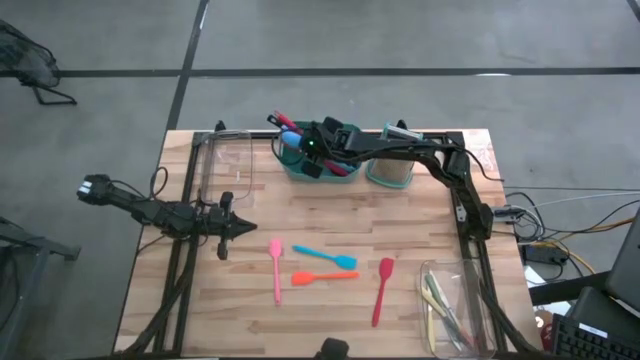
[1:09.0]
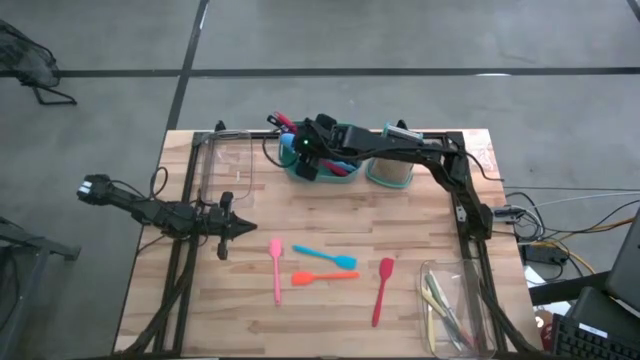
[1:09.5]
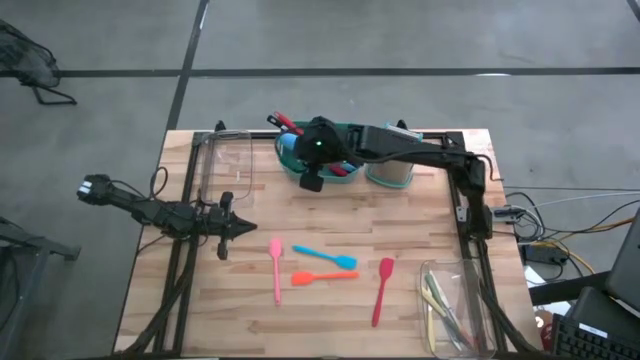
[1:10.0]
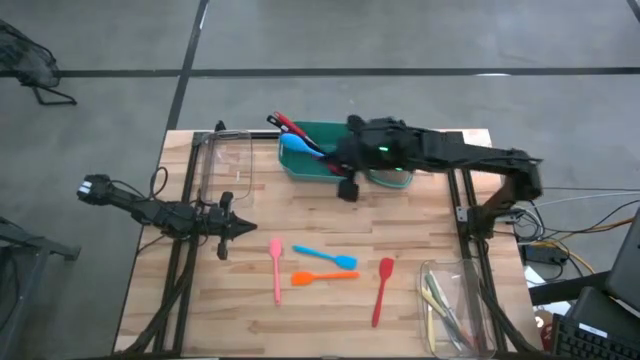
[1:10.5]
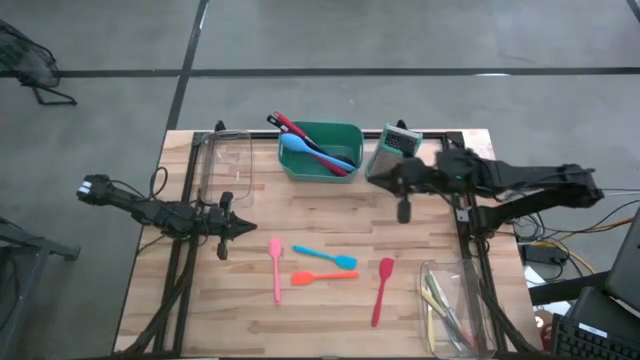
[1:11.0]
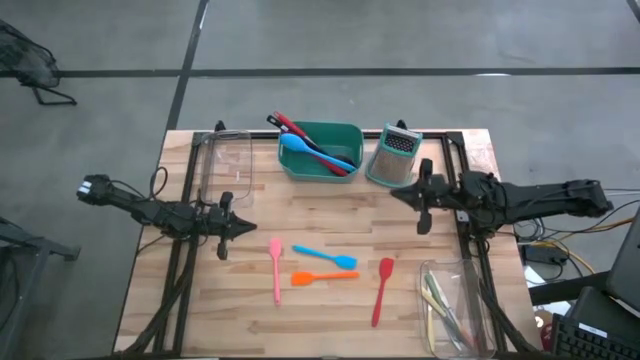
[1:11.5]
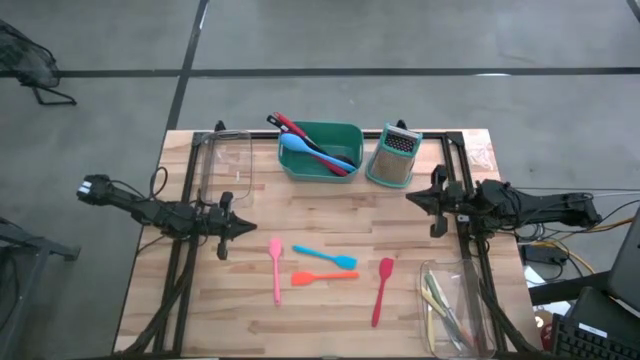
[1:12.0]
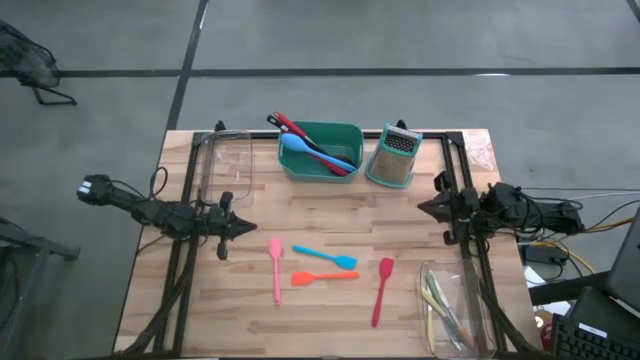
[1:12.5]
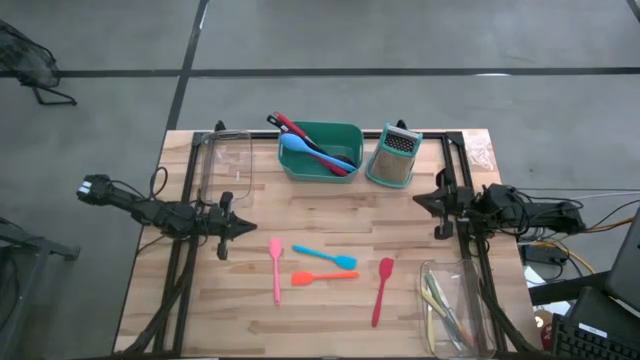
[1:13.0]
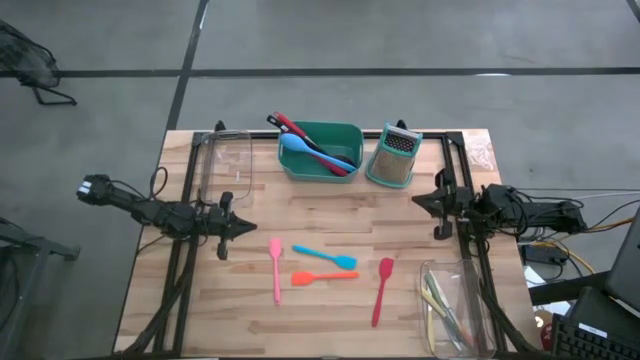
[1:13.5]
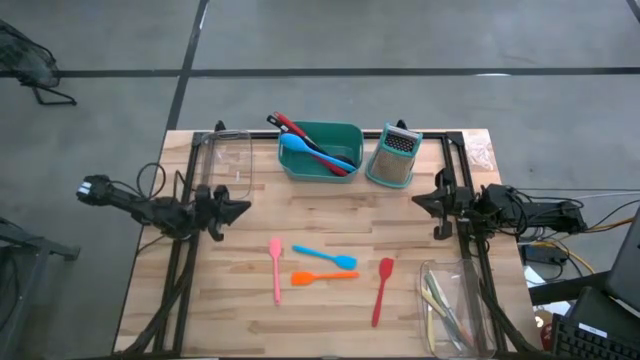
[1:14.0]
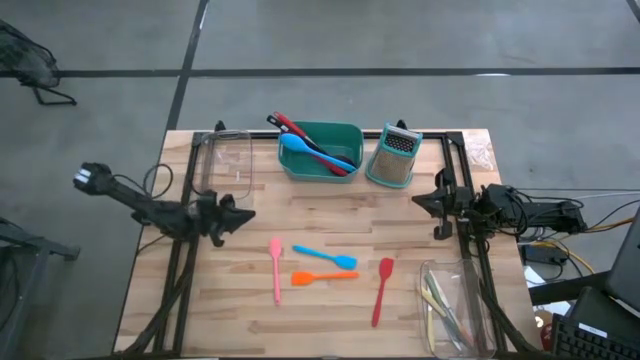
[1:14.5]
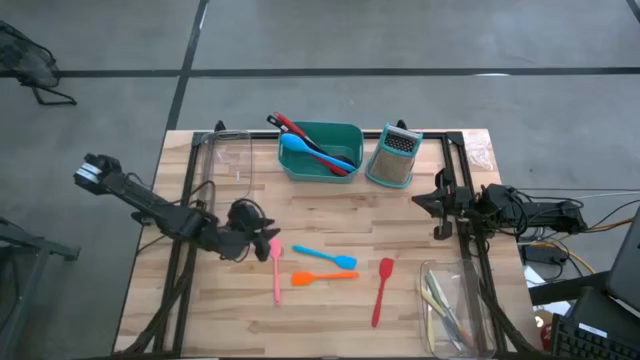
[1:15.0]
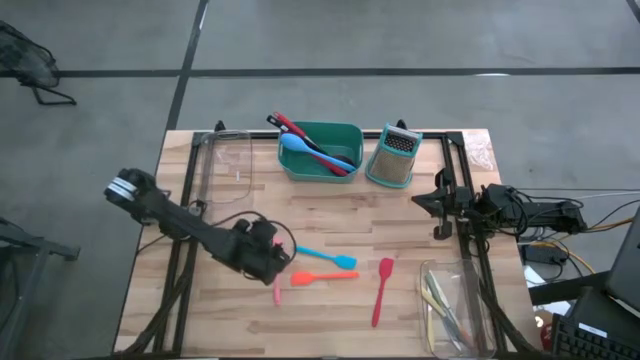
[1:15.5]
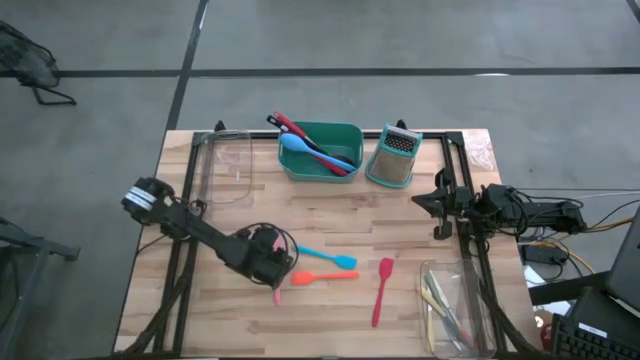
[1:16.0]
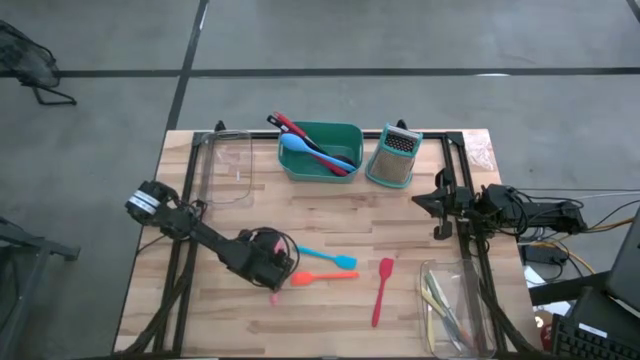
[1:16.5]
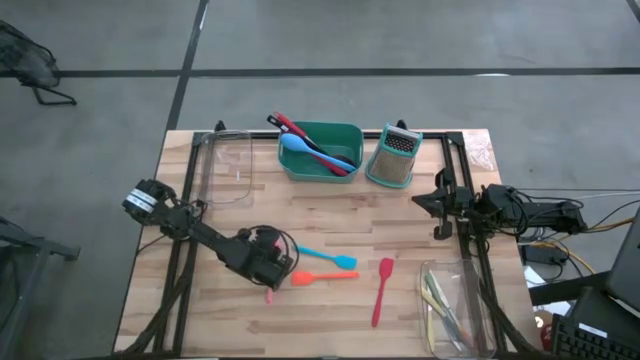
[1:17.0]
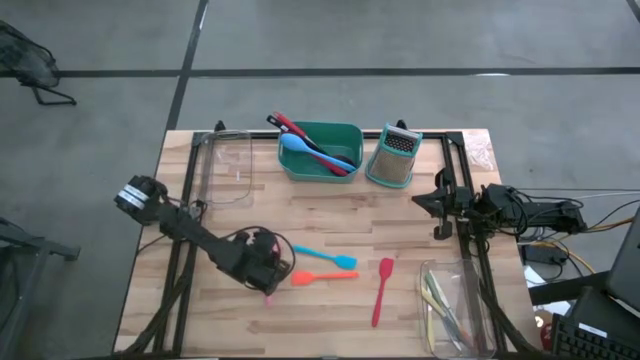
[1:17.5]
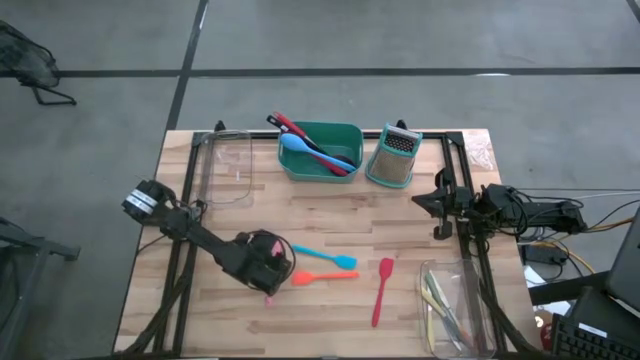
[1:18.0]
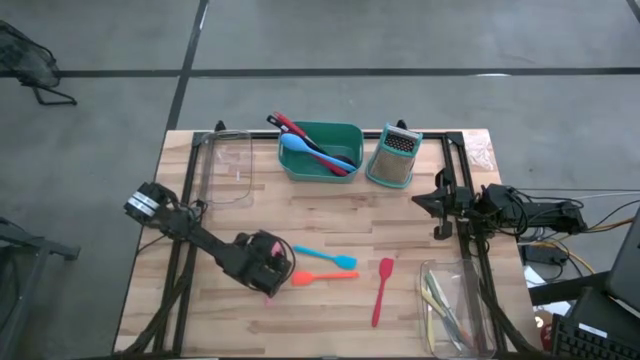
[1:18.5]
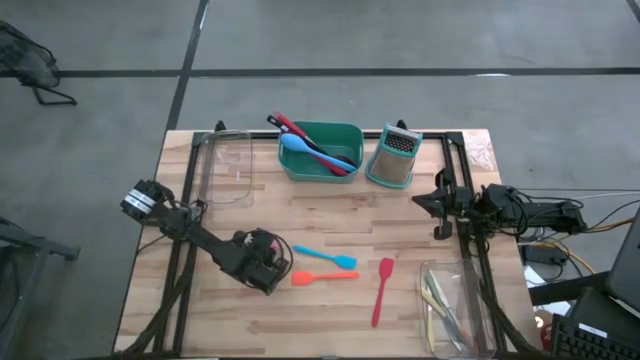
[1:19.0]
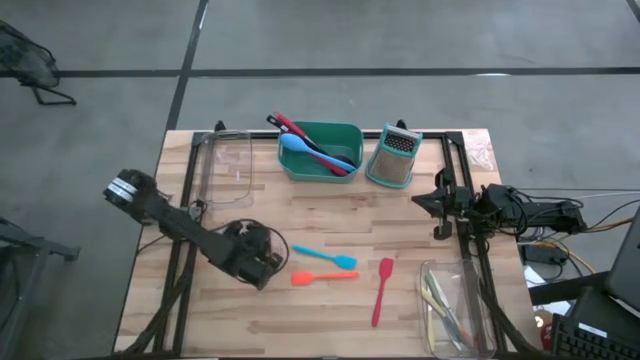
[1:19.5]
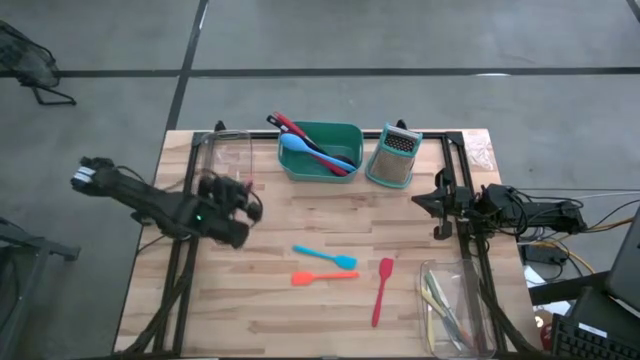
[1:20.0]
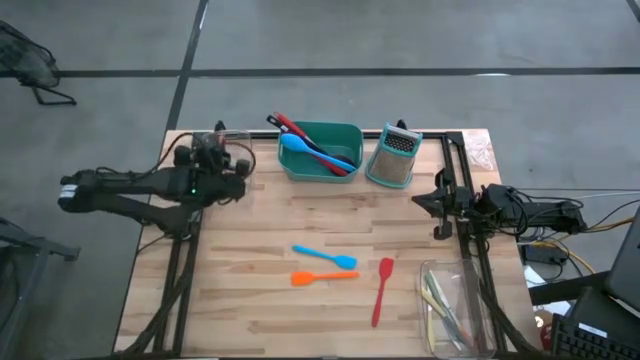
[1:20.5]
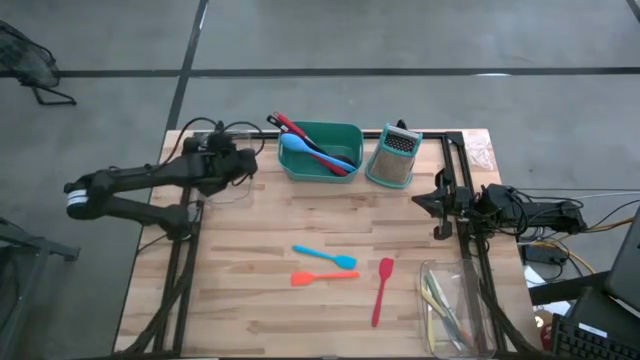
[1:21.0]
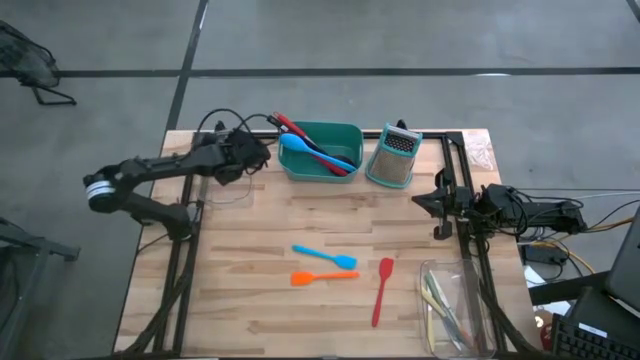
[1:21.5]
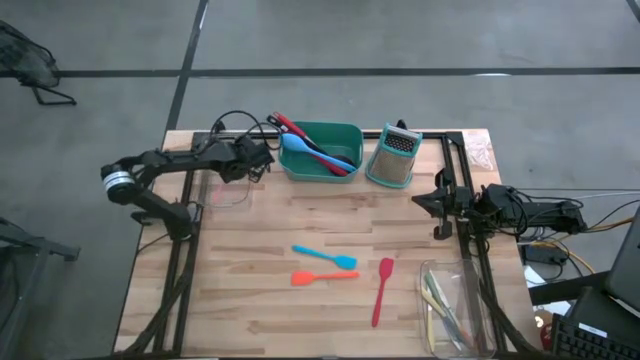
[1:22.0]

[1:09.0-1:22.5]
Task: Pick & Place Kitchen Items
Put the pink spatula into the left transparent bin

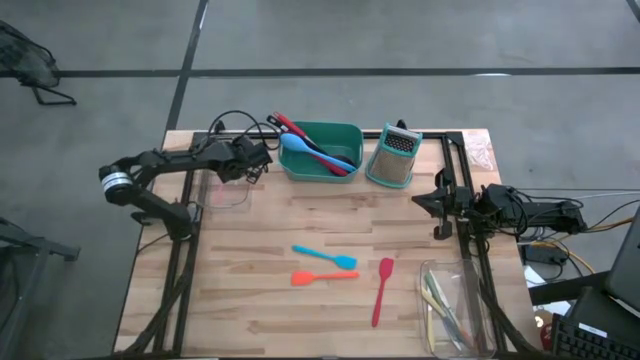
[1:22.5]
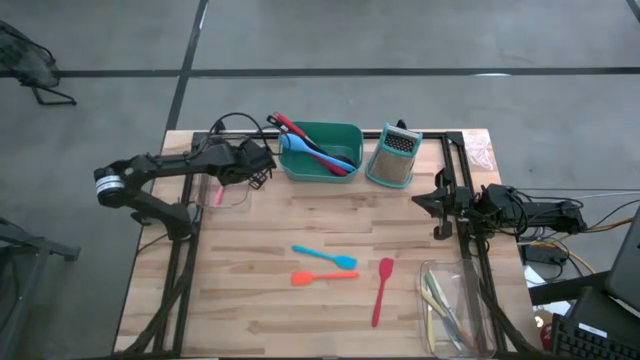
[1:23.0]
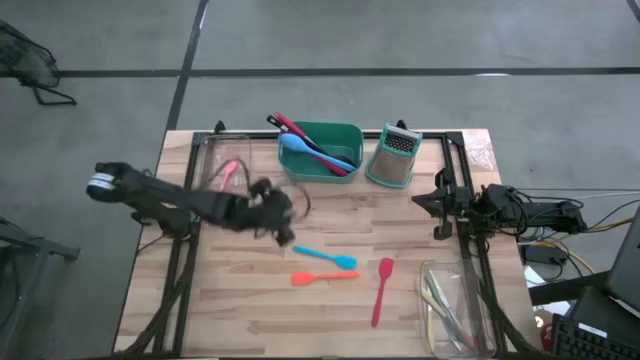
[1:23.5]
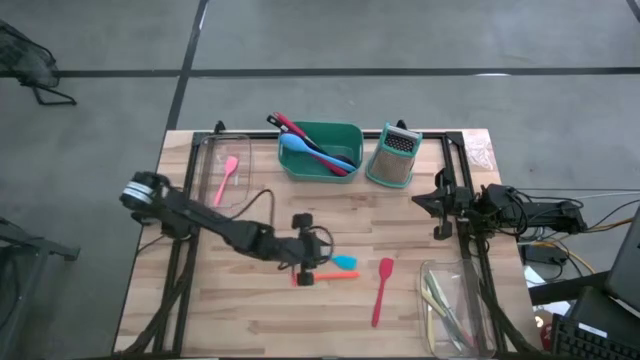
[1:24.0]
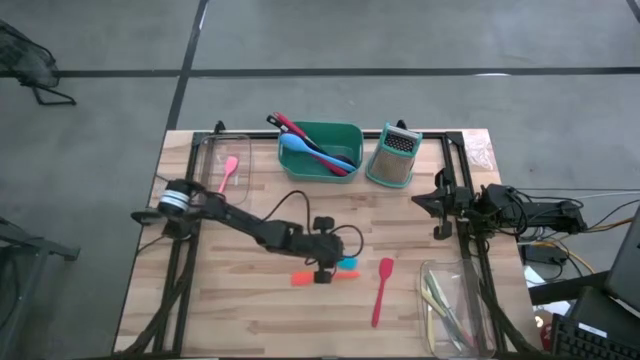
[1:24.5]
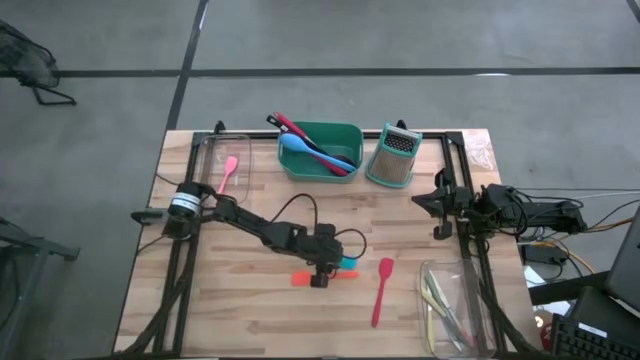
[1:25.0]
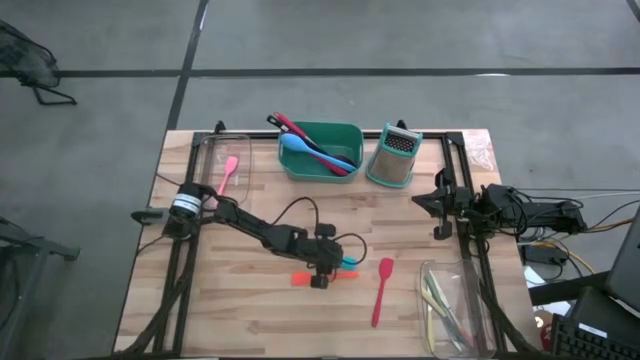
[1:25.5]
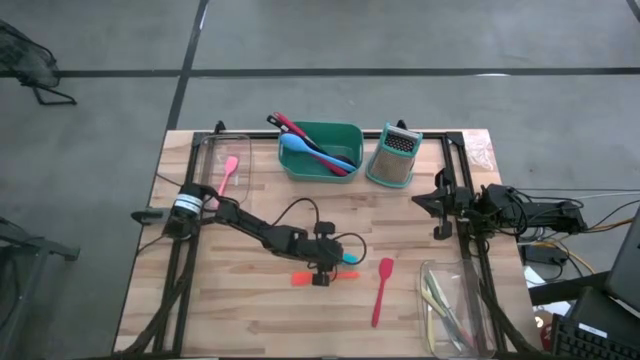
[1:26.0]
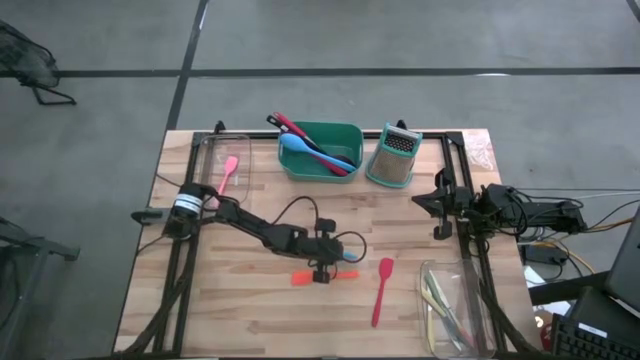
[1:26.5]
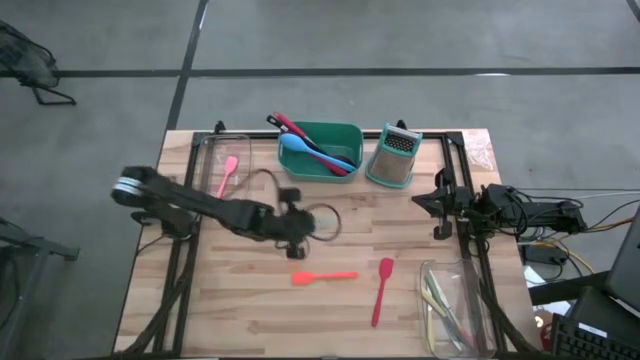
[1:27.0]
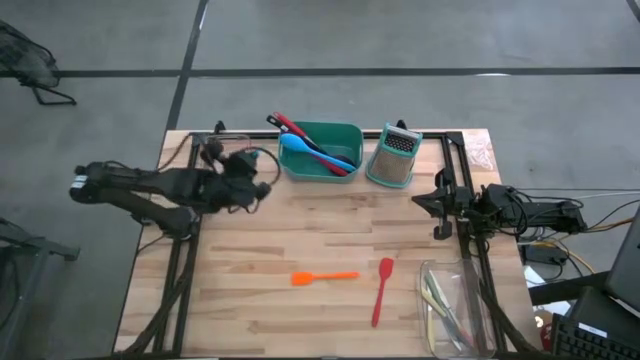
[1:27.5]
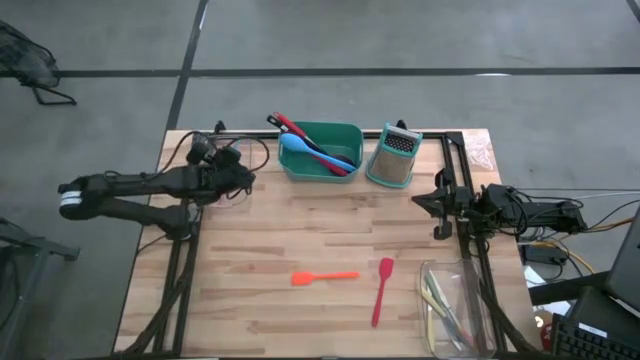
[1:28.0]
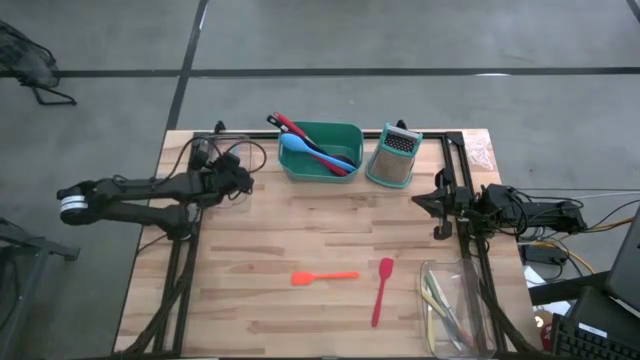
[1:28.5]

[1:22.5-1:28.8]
Put the blue spatula into the left transparent bin

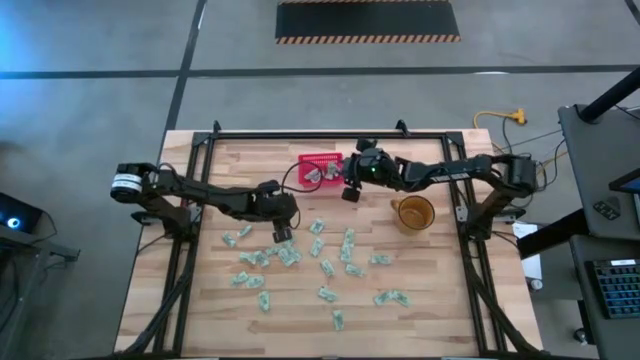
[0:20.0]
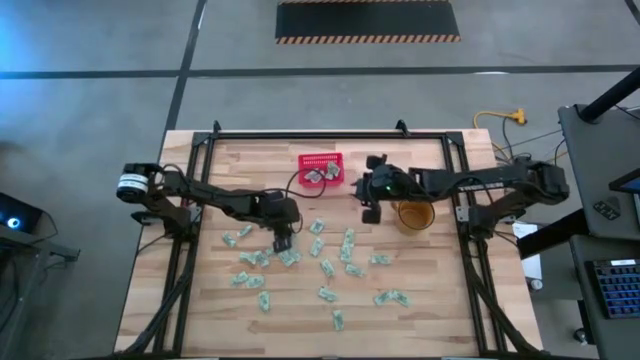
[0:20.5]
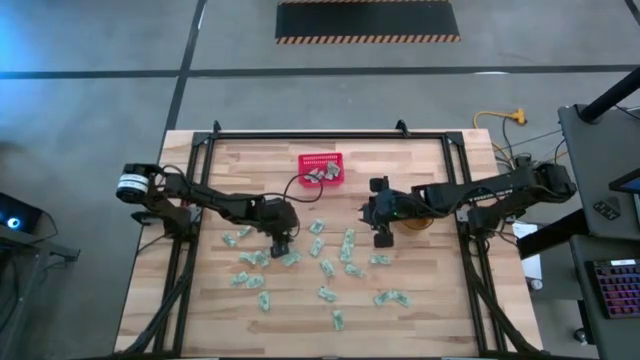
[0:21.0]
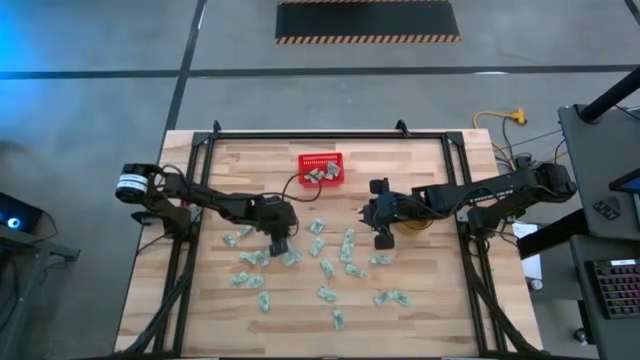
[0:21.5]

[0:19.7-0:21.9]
Task: Pick and place Stevia / Truvia into bins
Put the white stevia packet into the red bin
